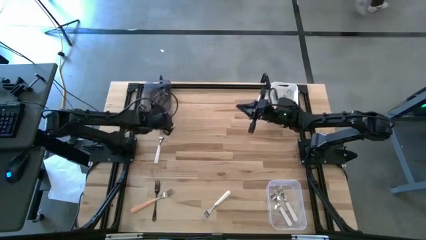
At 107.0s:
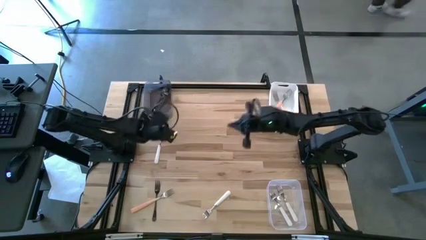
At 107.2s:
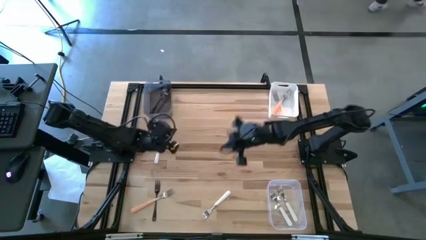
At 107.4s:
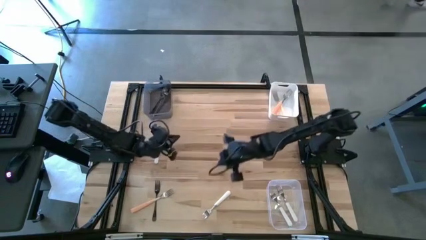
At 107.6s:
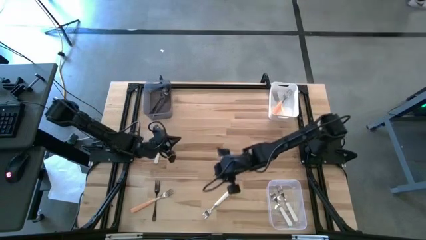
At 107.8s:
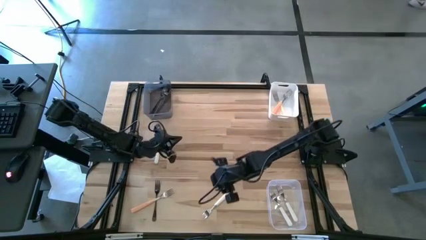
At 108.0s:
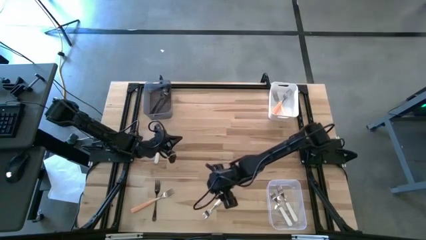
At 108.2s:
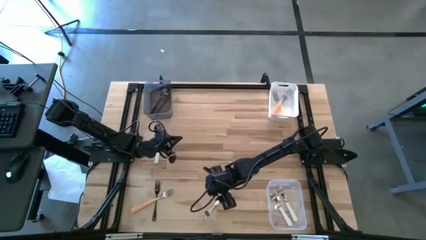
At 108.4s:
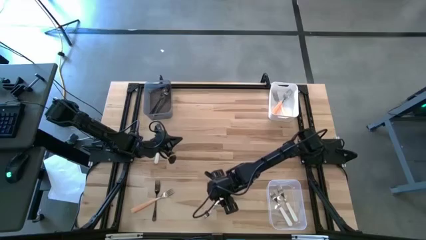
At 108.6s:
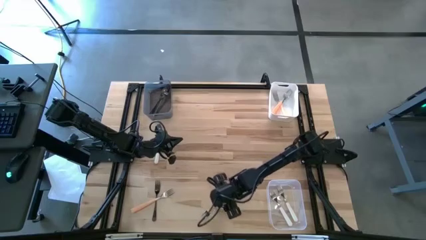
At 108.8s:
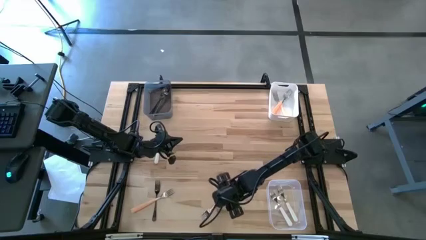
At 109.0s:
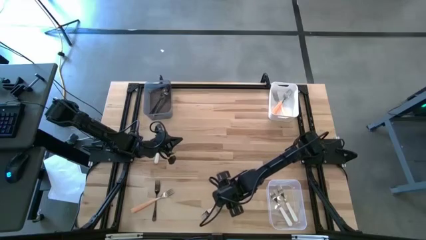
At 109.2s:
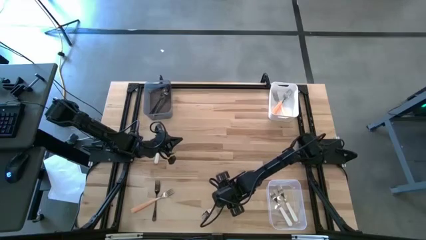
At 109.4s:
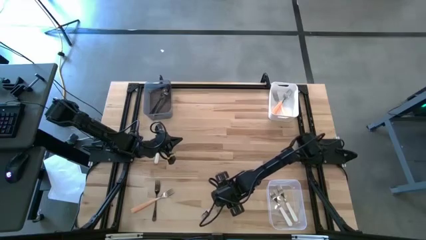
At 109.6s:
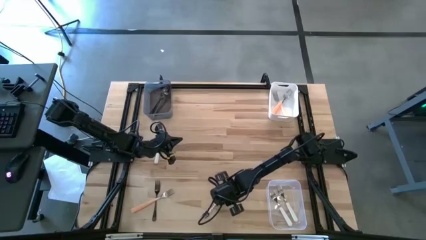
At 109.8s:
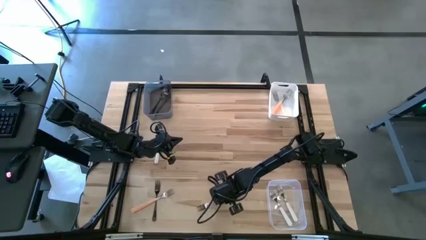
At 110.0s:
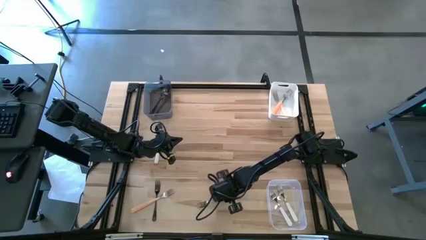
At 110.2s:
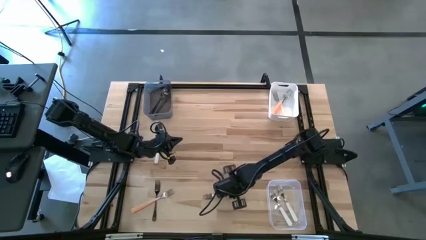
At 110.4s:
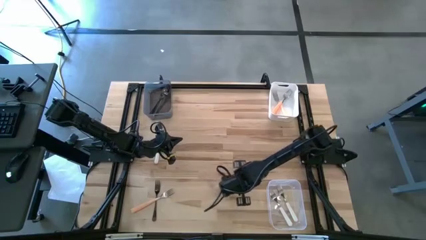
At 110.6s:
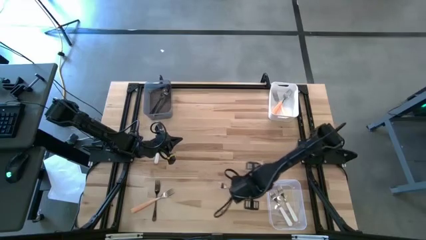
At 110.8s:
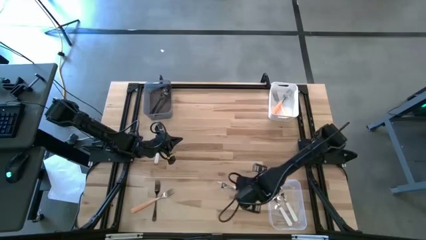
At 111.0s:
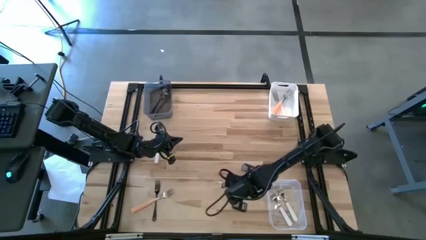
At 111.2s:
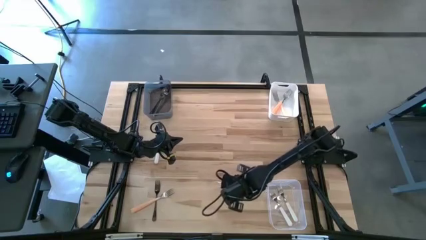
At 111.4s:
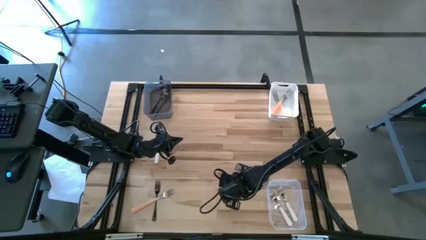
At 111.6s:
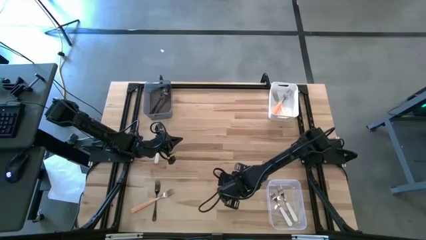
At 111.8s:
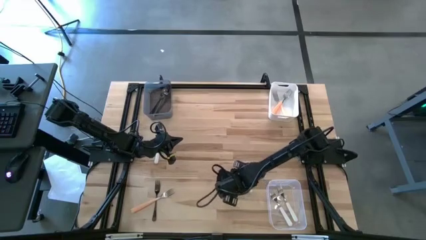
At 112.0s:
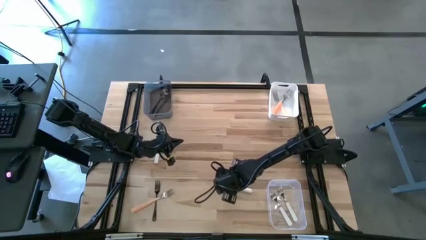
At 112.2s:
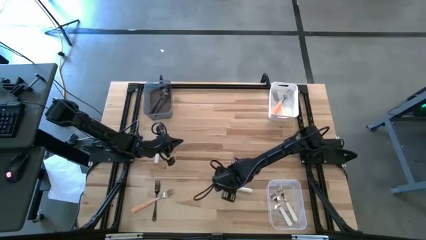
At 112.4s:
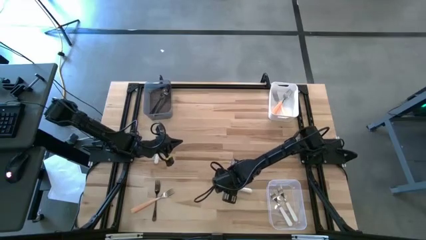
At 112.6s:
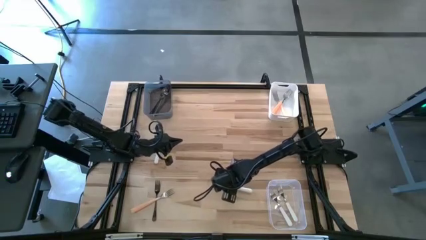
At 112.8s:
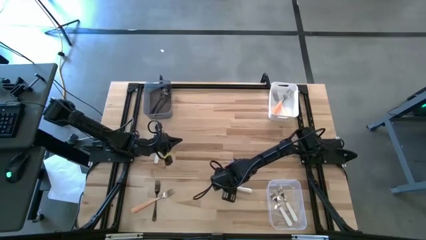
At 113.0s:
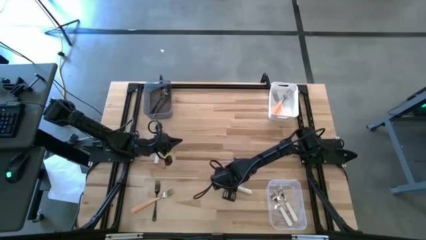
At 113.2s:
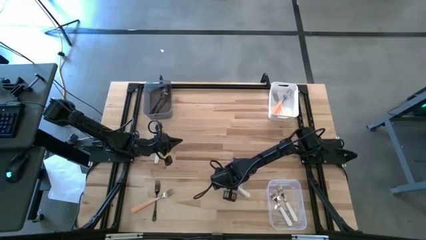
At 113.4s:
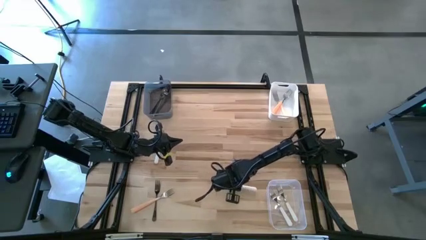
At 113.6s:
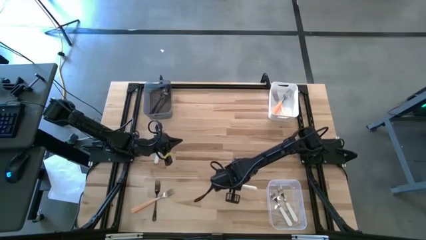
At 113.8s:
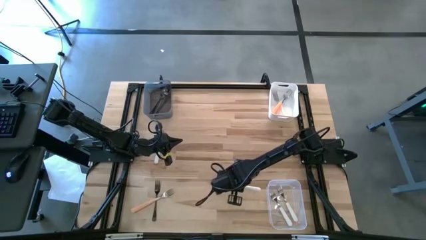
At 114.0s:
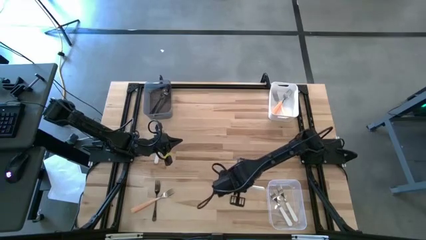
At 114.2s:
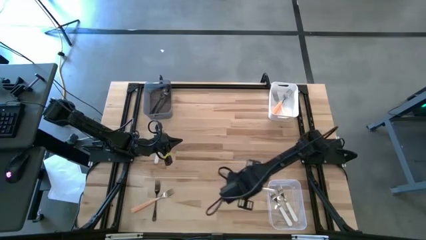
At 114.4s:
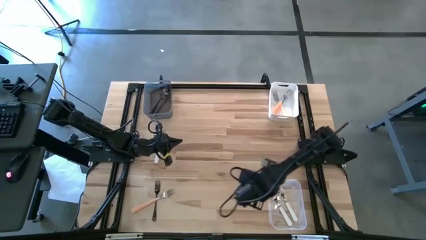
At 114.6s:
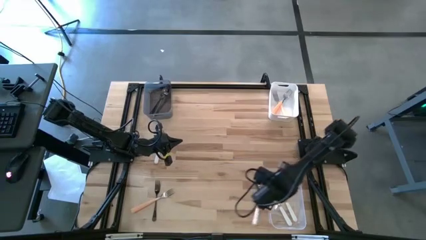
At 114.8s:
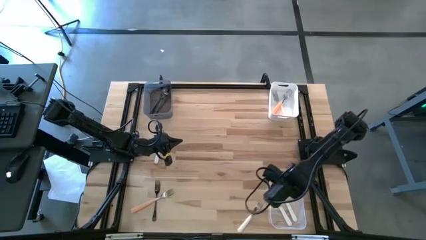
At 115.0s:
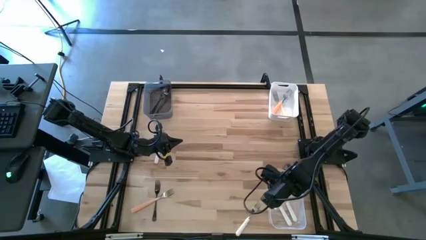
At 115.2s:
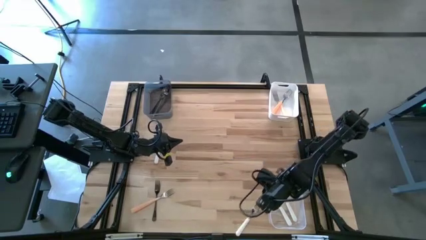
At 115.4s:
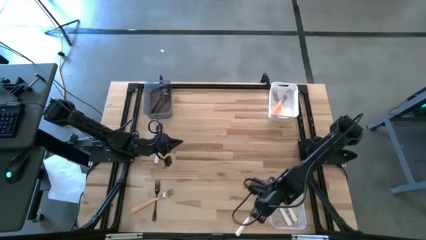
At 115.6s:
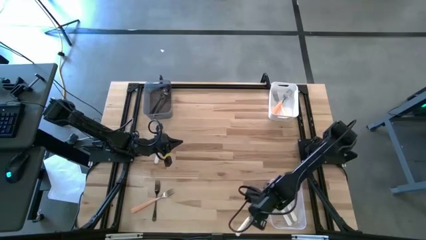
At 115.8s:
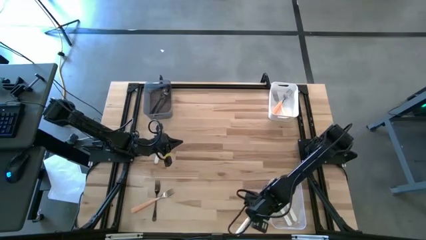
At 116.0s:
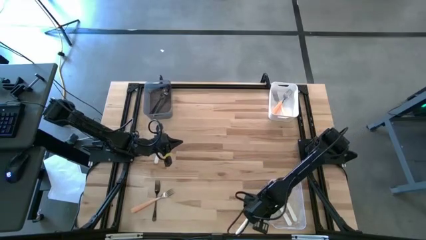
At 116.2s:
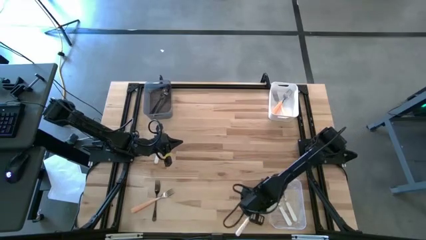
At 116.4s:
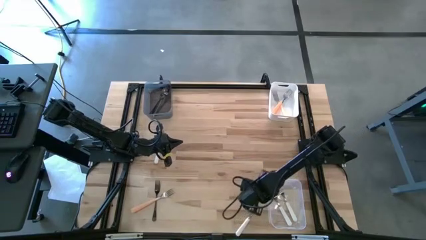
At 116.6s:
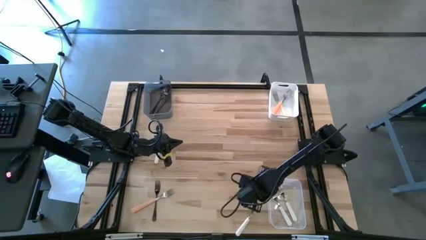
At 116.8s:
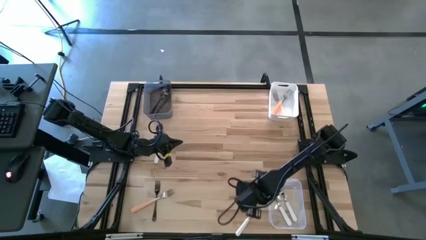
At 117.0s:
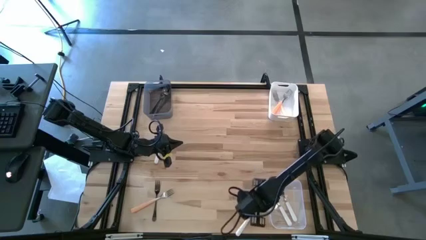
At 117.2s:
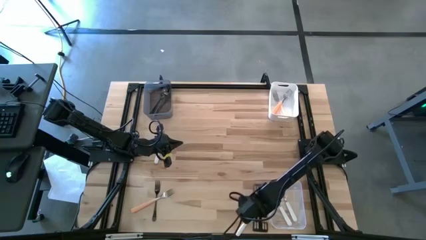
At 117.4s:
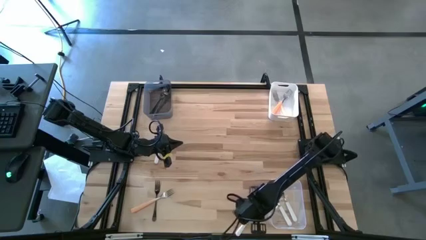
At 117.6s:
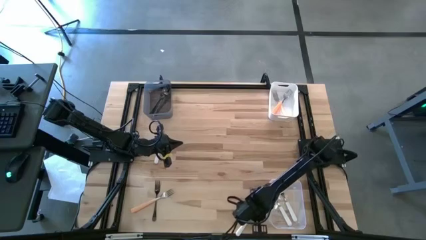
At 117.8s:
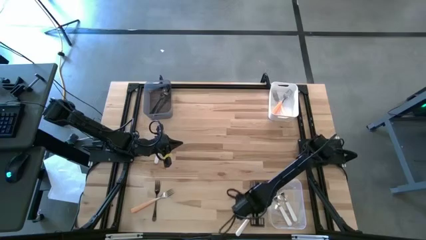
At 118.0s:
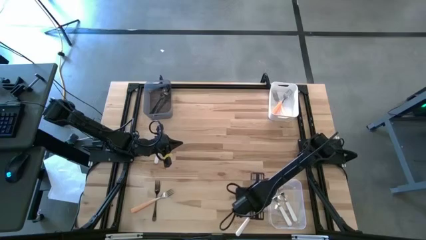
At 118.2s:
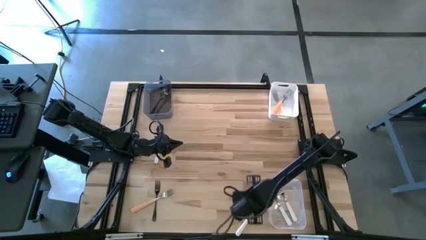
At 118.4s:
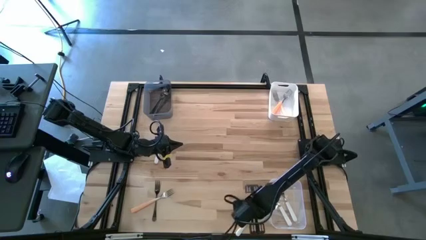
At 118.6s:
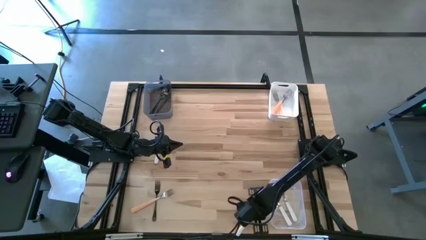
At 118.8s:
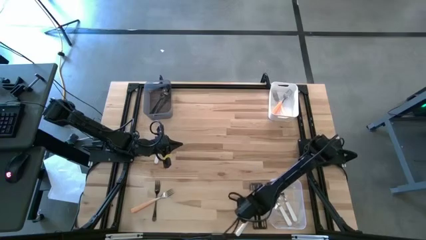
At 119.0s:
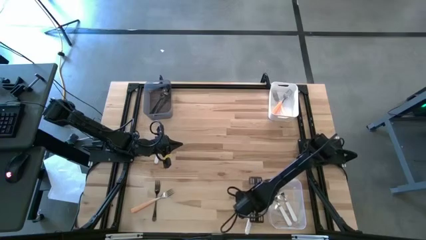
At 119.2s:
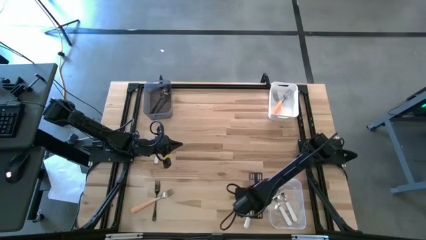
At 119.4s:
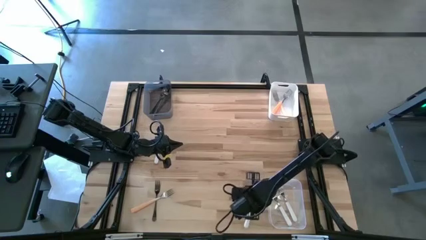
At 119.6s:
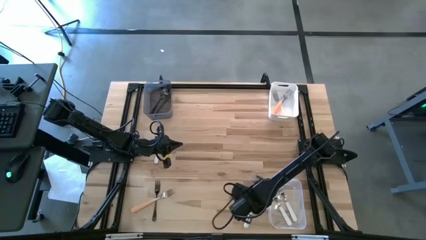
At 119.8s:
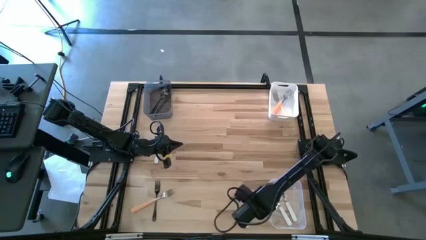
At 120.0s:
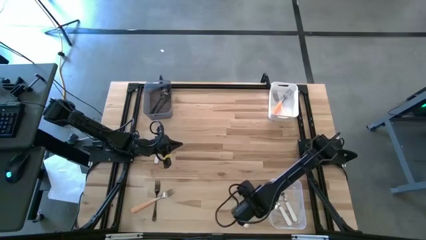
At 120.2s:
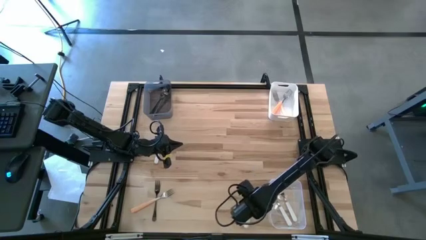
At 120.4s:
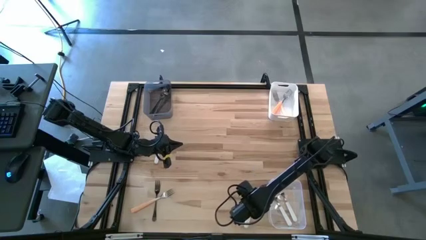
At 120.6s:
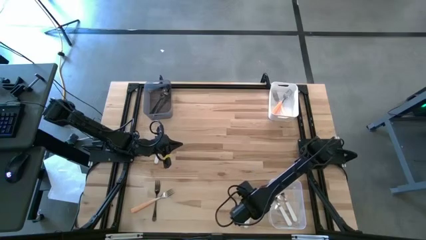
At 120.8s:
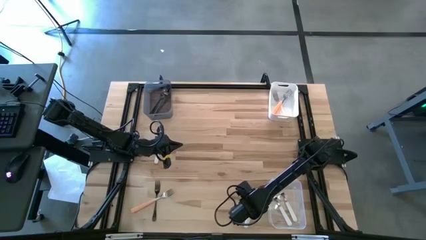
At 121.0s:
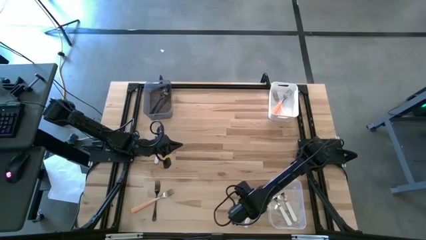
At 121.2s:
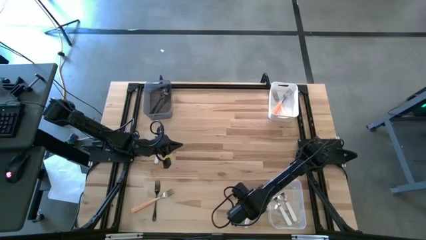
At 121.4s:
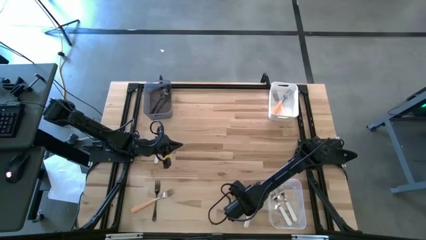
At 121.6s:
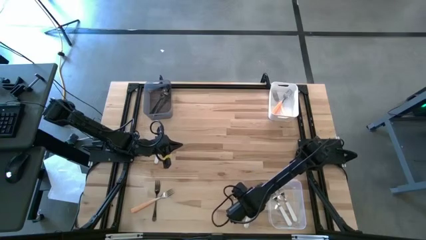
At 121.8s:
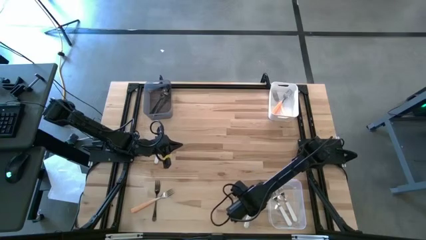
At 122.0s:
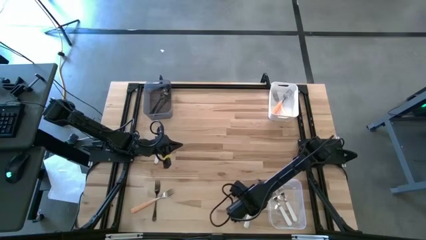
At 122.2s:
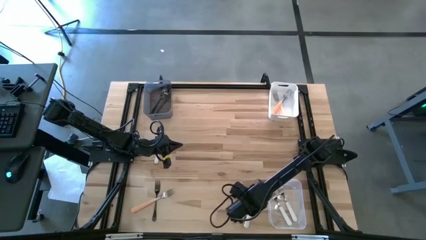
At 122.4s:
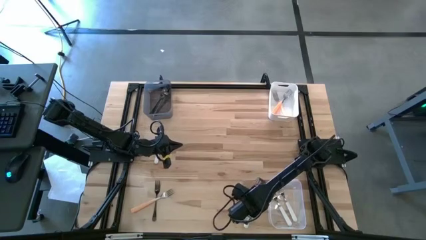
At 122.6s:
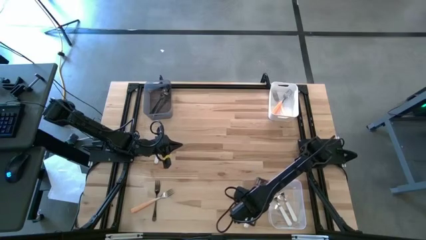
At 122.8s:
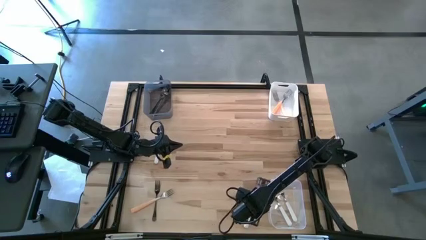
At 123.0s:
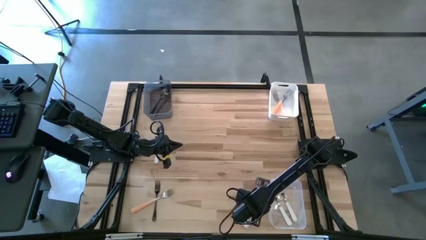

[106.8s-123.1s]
Task: Sort silverware by color (type)
Put the bottom white fork into the transparent bin
